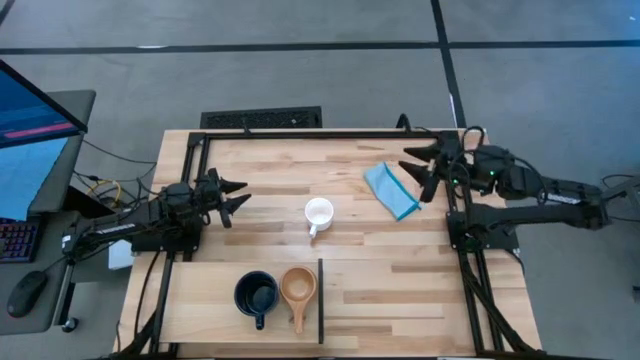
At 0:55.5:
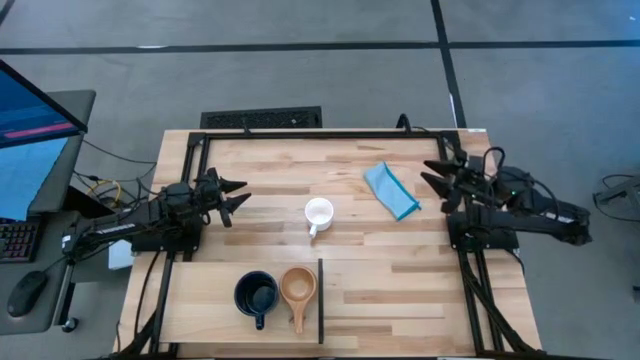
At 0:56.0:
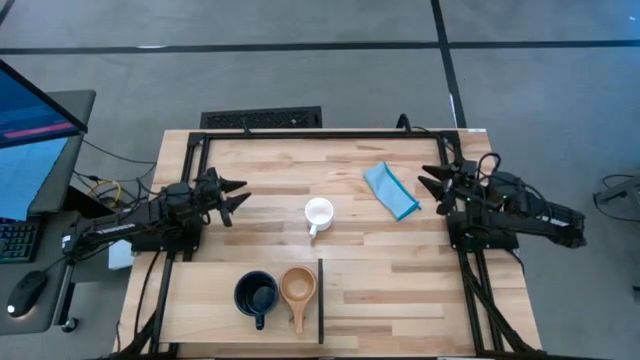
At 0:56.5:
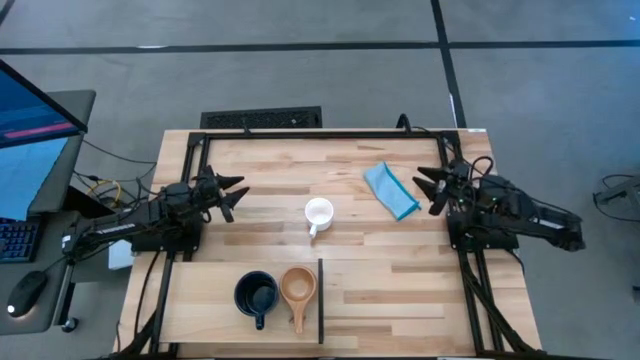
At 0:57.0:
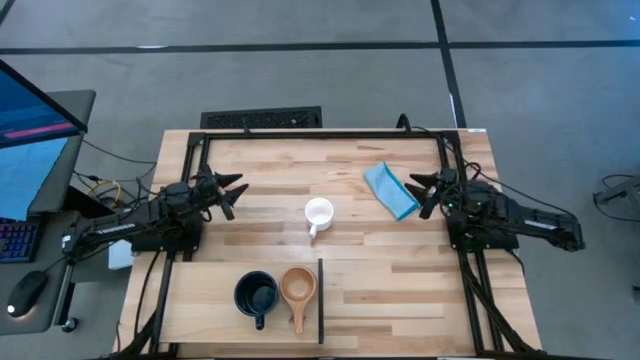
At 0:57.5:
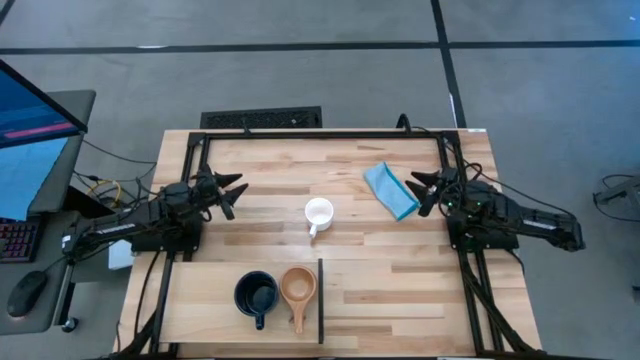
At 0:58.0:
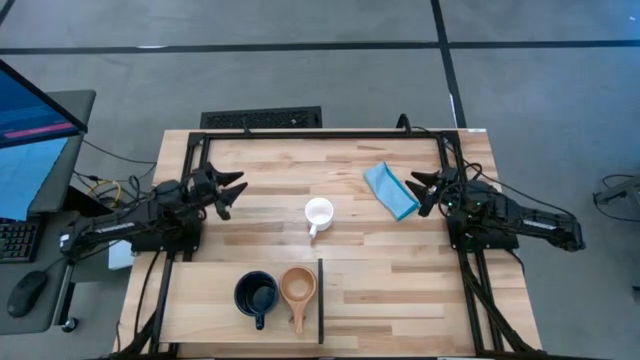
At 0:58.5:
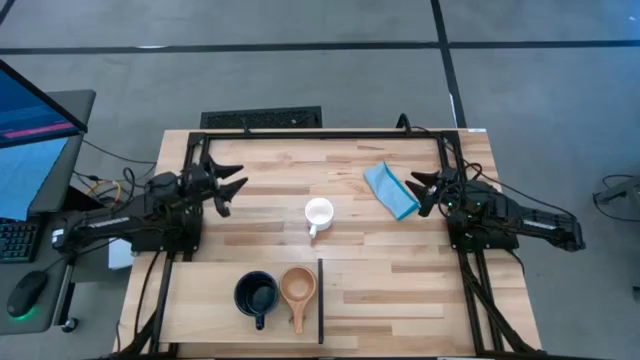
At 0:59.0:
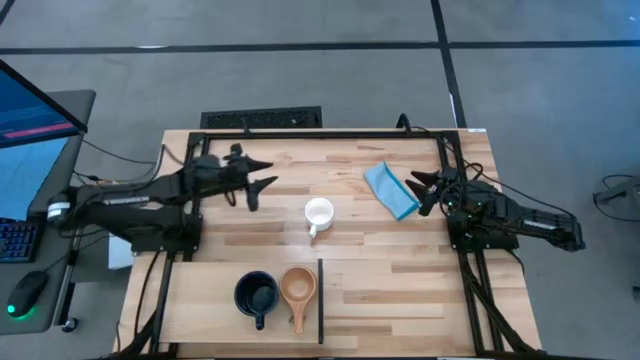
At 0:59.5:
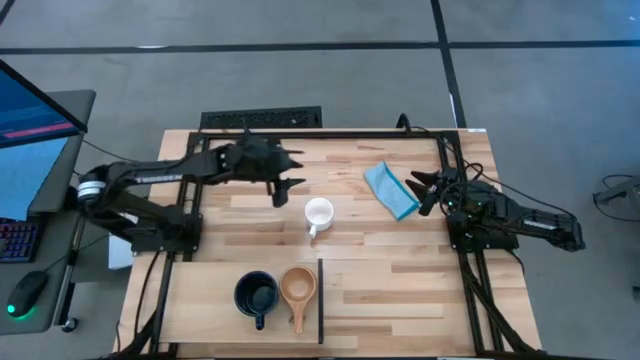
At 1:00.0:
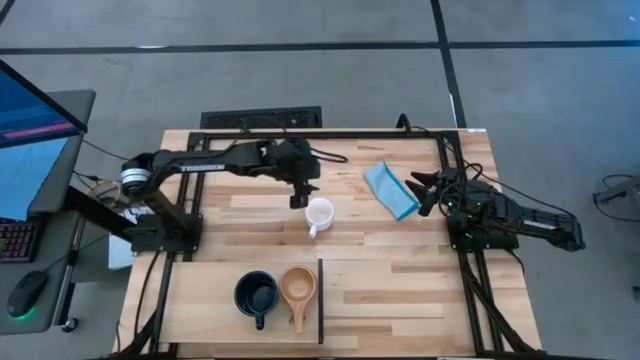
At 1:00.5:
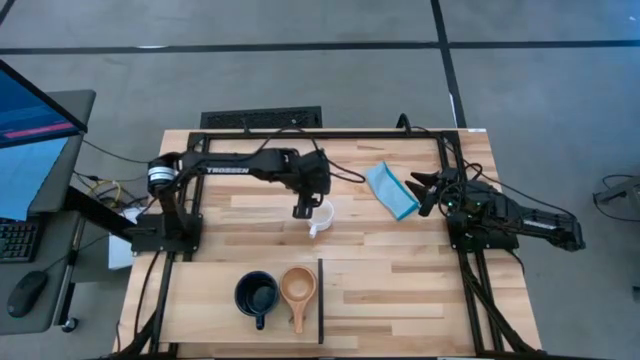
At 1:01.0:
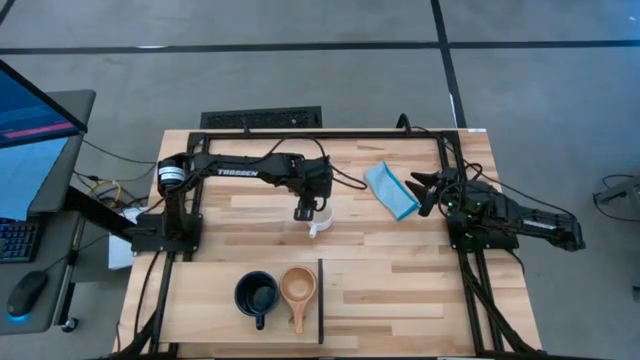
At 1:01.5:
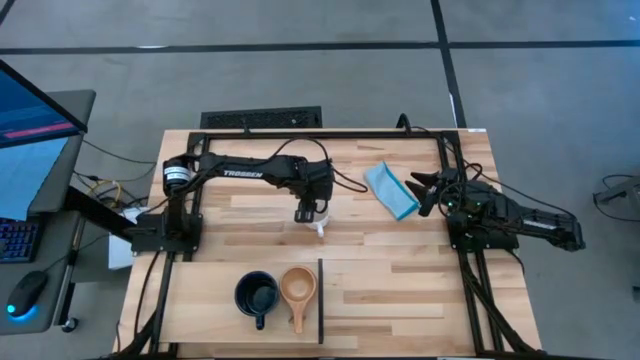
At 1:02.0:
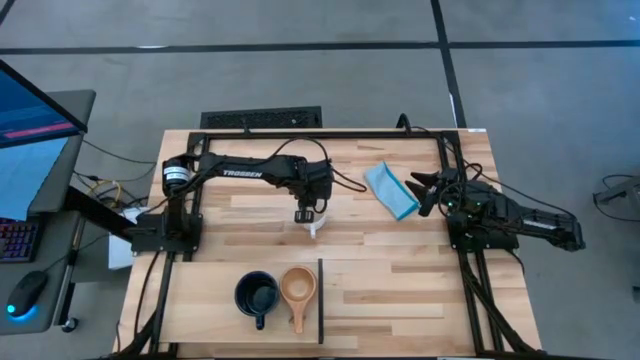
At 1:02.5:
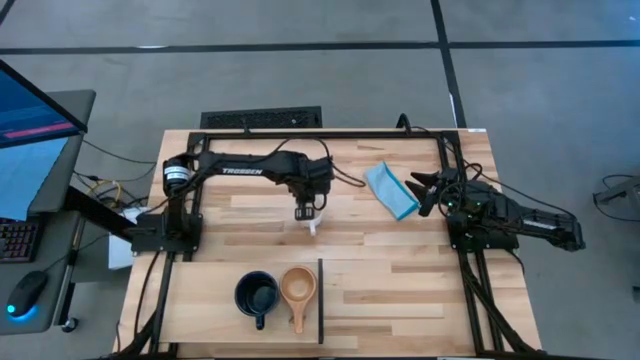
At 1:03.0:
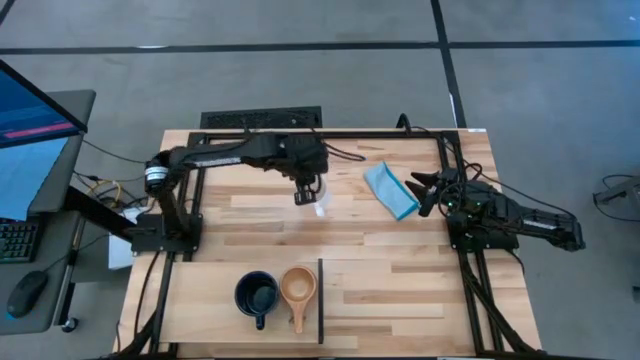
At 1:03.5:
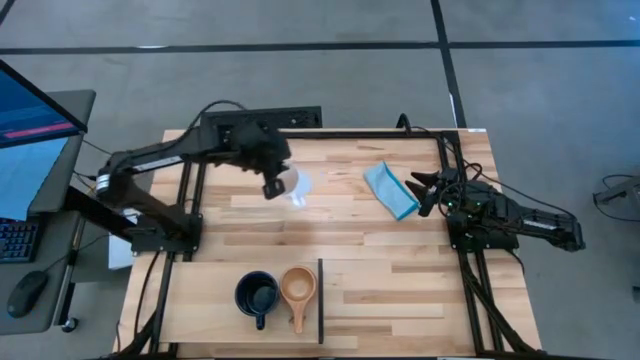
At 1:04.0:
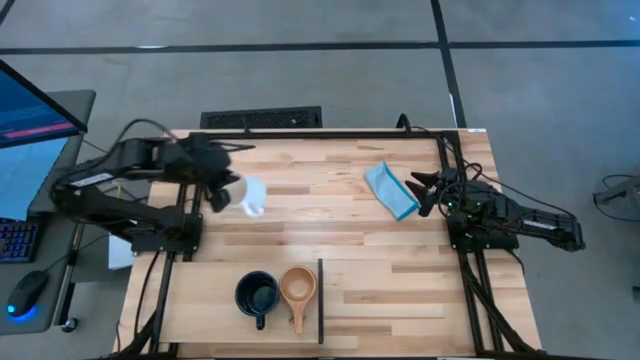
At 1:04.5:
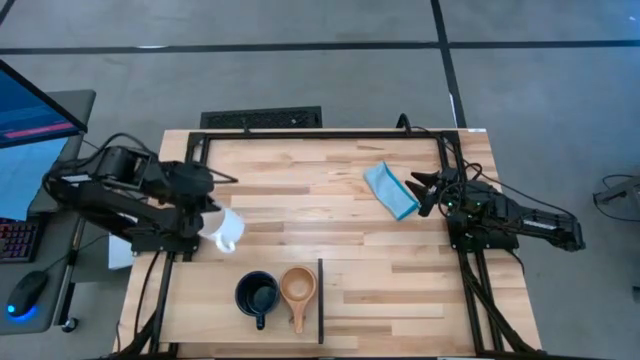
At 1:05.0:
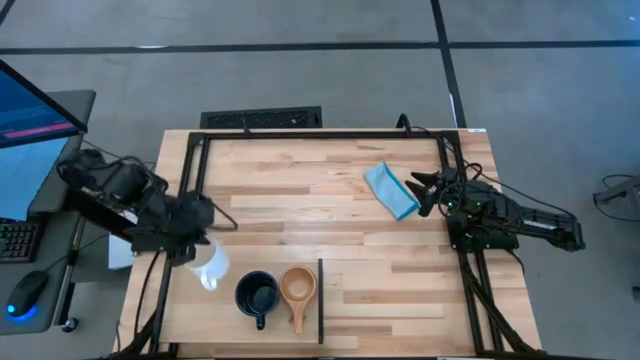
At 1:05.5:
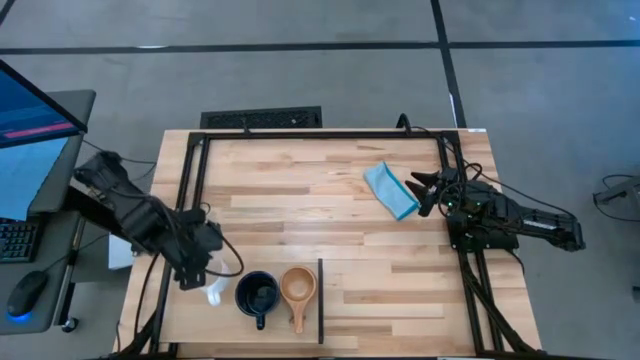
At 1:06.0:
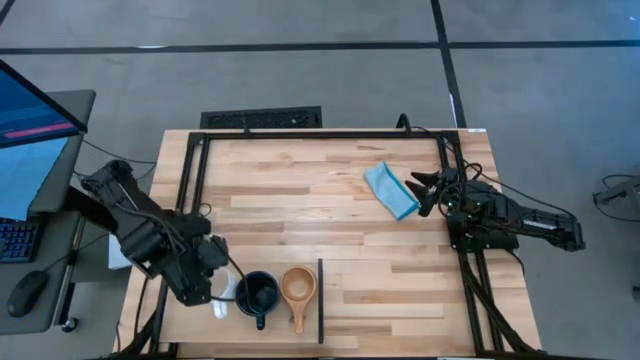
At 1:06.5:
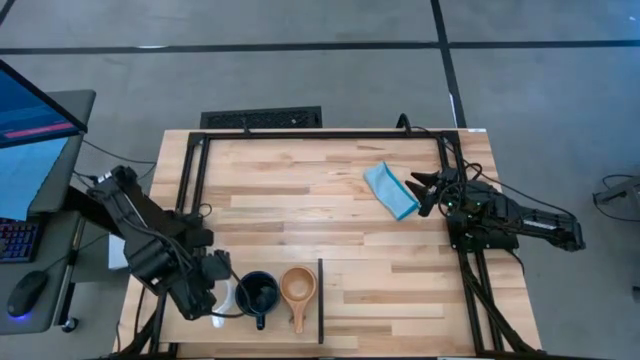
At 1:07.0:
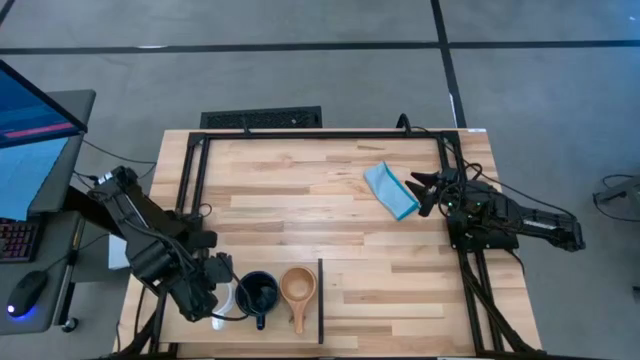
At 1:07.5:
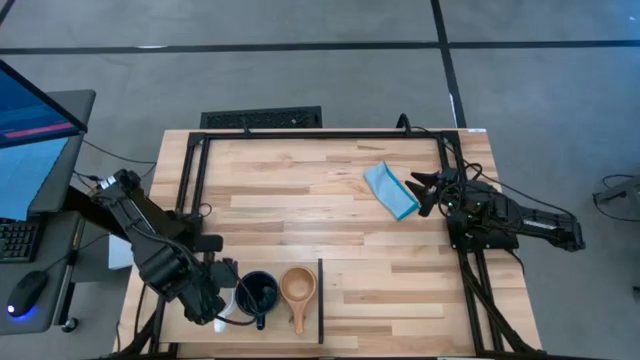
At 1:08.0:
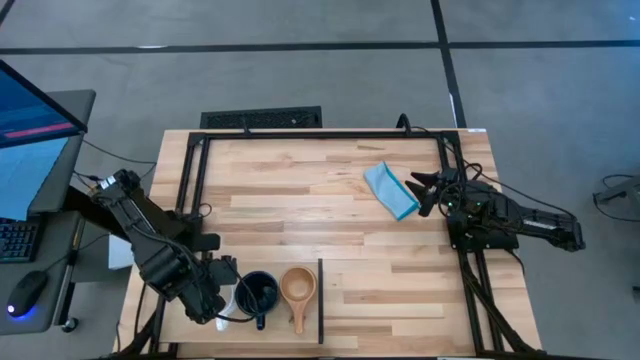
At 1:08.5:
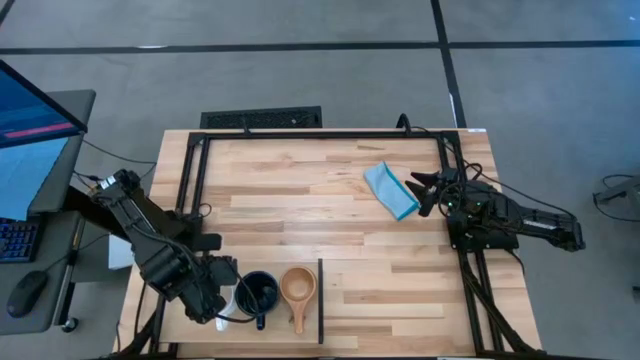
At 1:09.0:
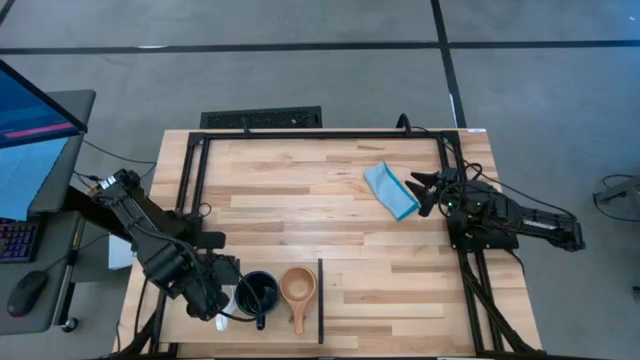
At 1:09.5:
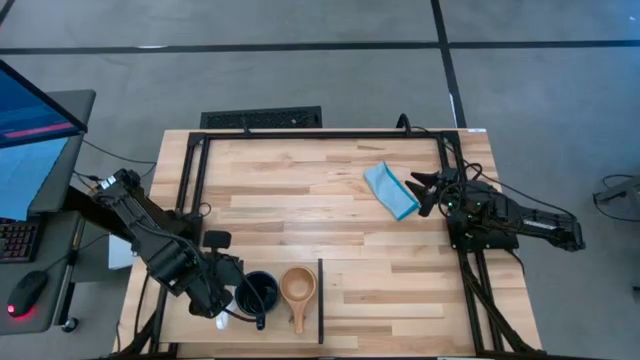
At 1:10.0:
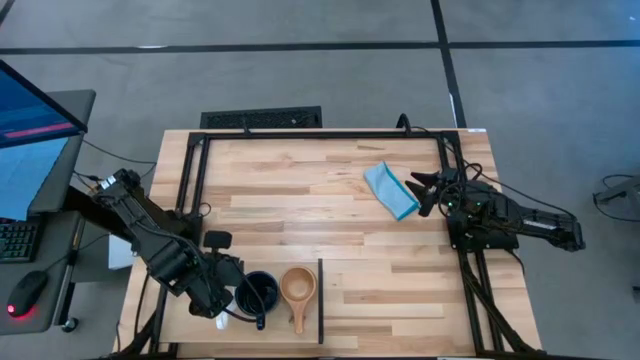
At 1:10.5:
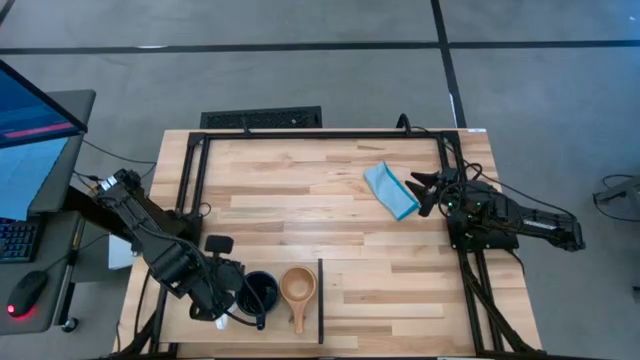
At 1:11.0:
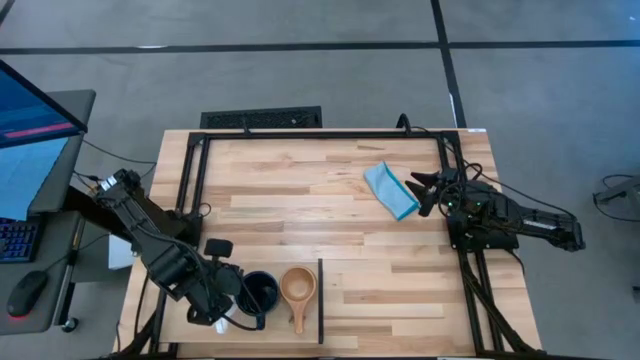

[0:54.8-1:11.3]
Task: Stack small to large cups/mugs on shelf
Put the white mug on the shelf

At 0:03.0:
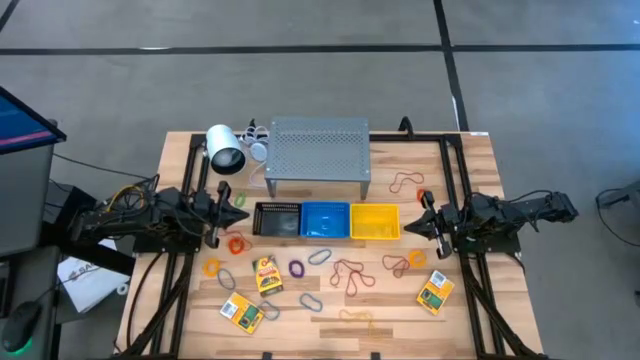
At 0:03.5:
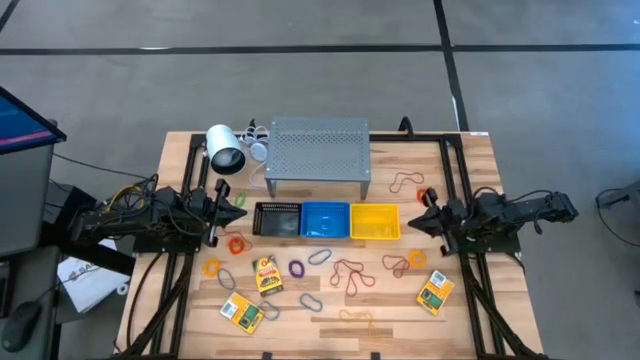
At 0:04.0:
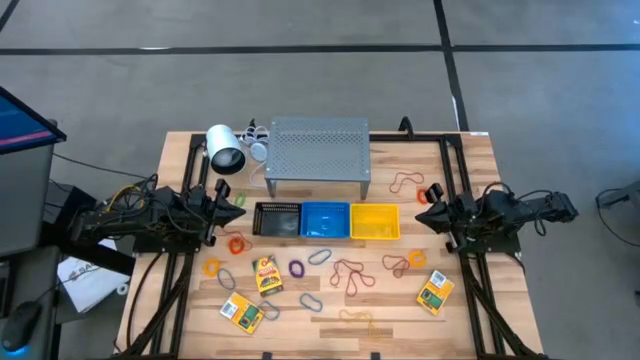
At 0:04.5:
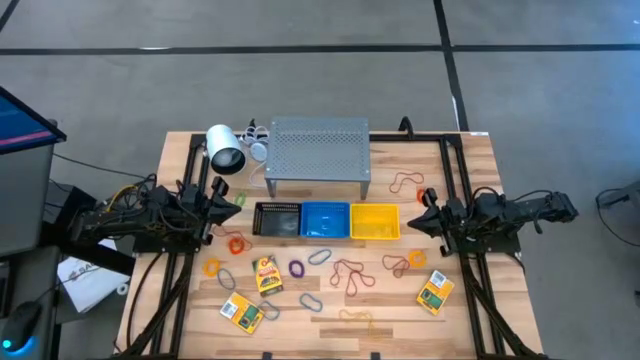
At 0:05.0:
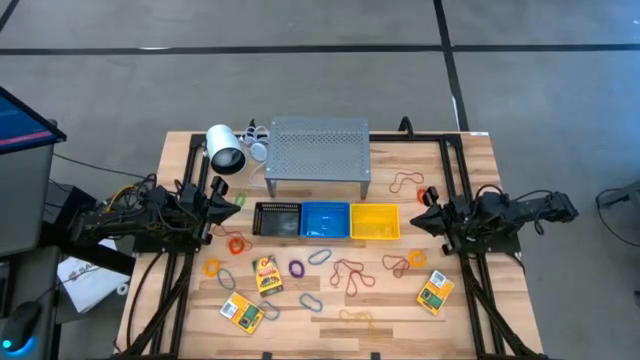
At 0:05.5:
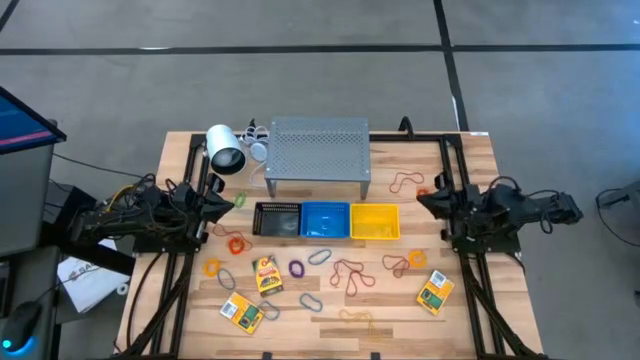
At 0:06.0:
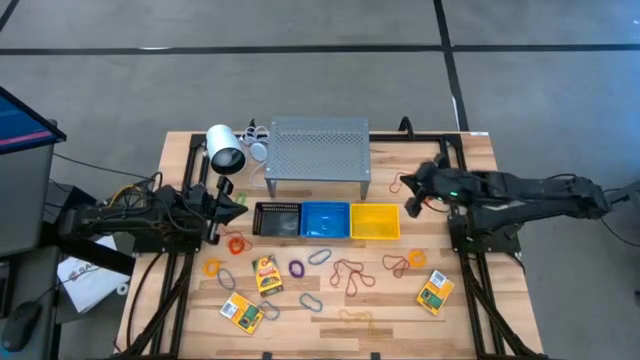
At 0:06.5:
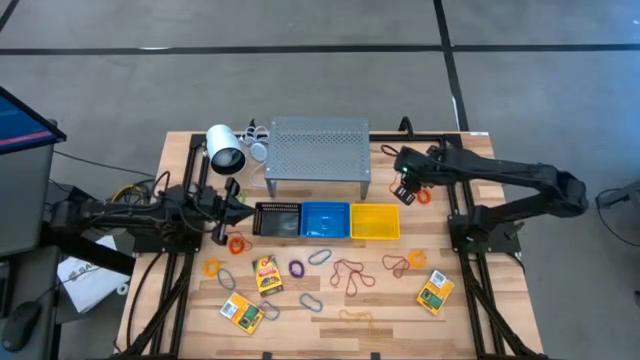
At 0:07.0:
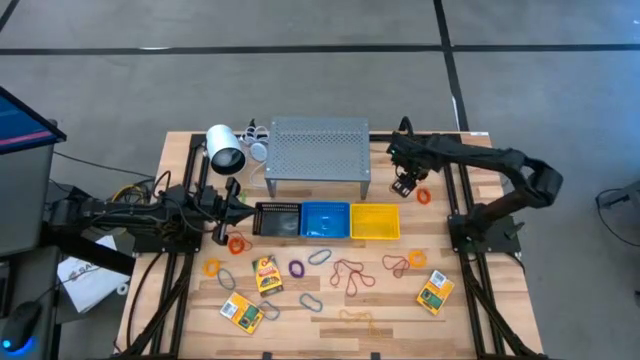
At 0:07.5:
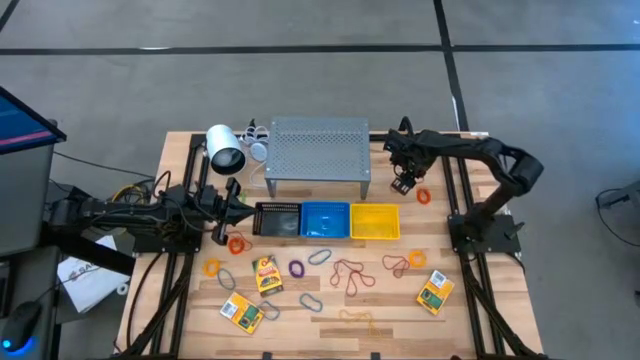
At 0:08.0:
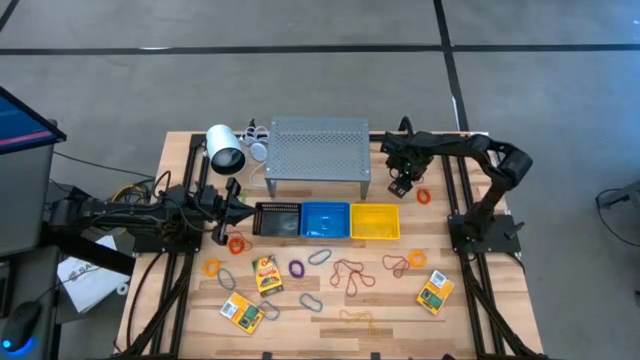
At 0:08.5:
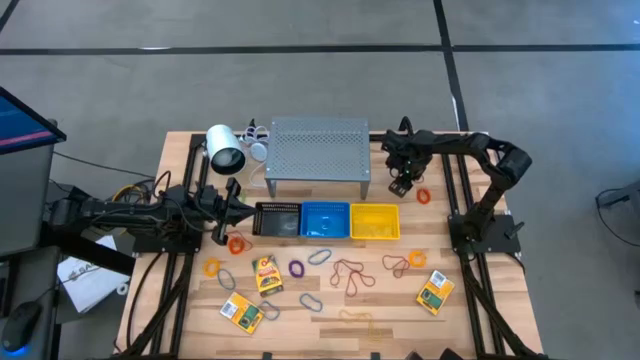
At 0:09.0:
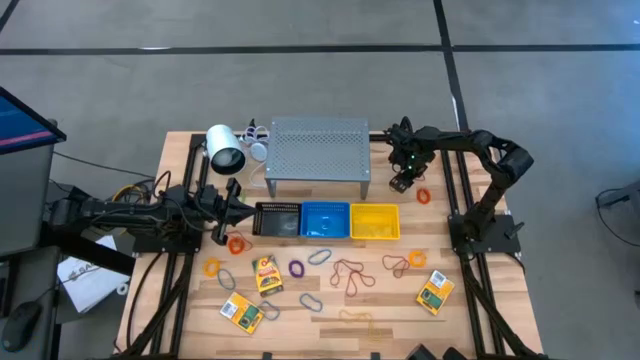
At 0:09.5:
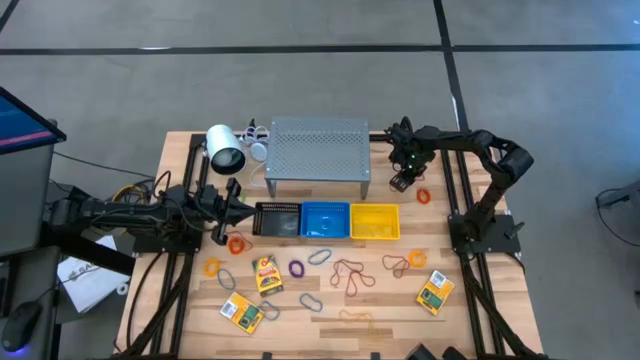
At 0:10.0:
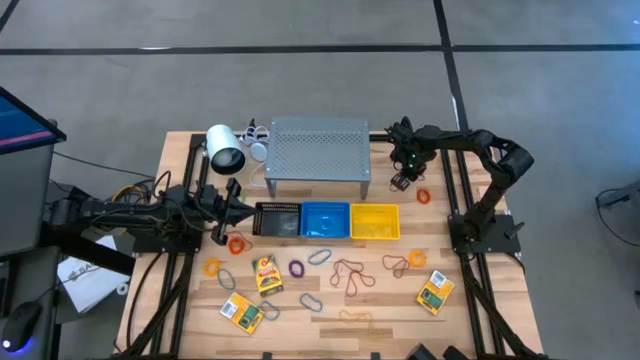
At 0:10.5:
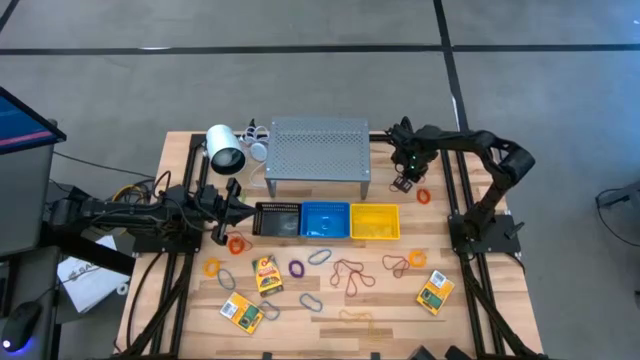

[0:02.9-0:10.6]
Task: Pick & Place Office Desk Supplies
Put the red rubber band into the blue bin
